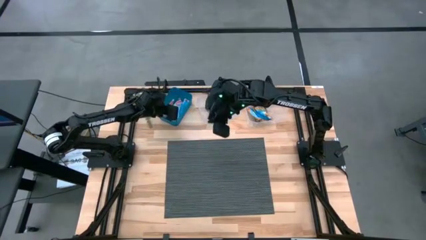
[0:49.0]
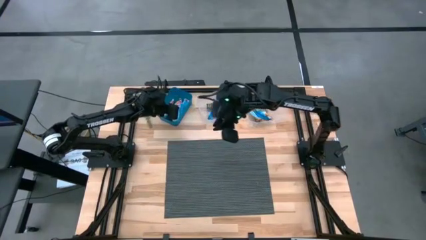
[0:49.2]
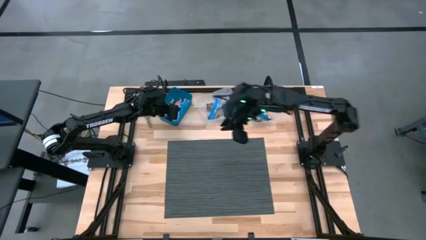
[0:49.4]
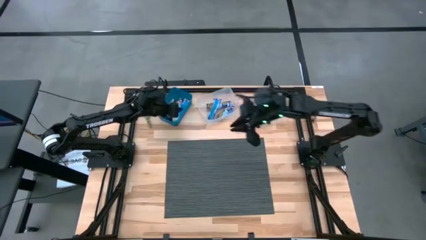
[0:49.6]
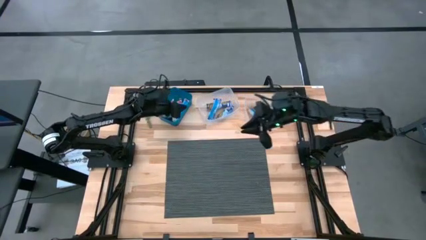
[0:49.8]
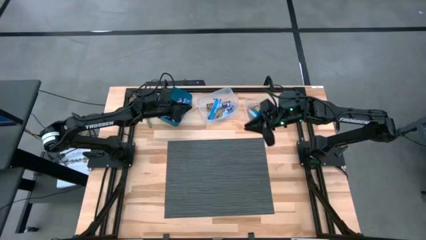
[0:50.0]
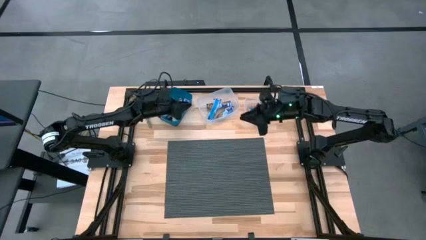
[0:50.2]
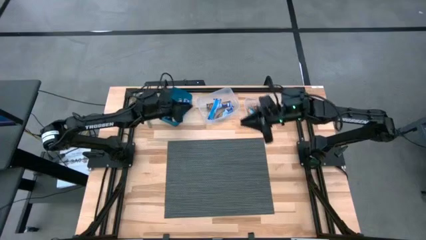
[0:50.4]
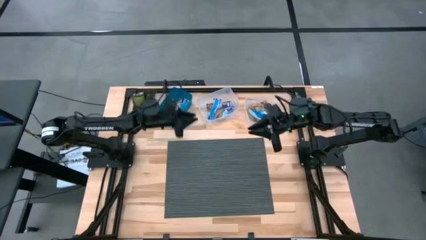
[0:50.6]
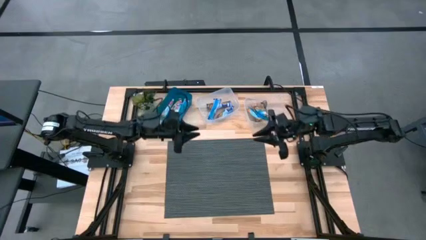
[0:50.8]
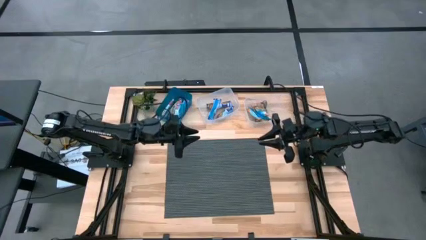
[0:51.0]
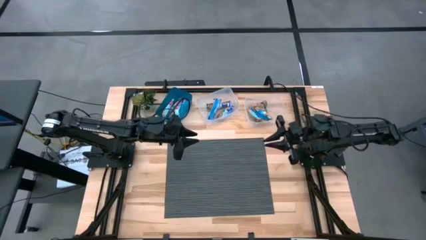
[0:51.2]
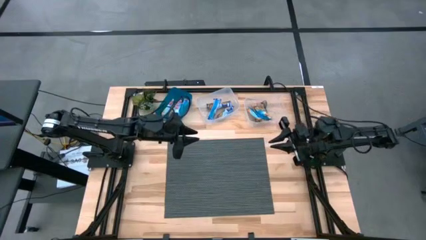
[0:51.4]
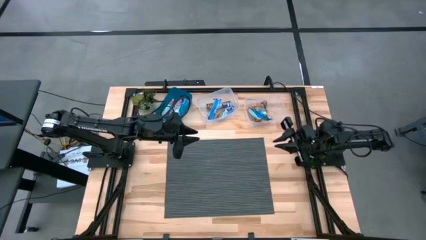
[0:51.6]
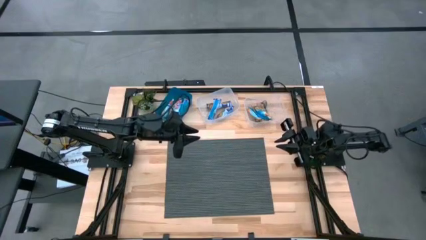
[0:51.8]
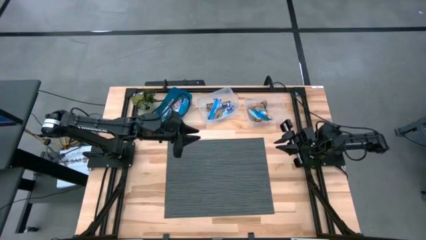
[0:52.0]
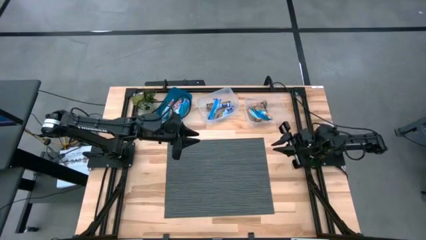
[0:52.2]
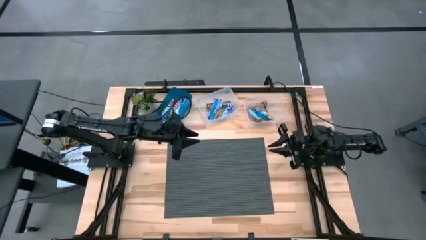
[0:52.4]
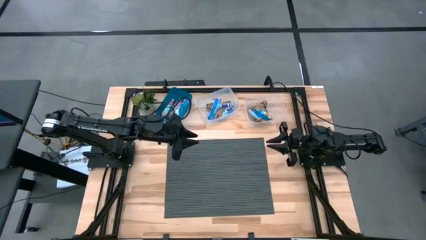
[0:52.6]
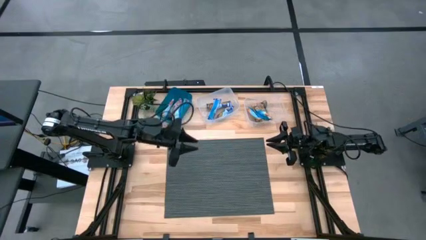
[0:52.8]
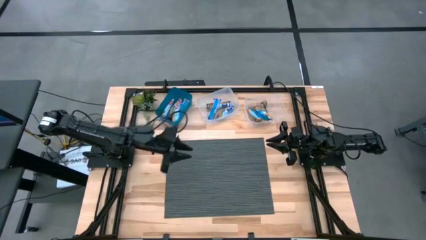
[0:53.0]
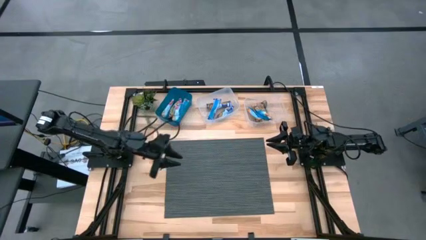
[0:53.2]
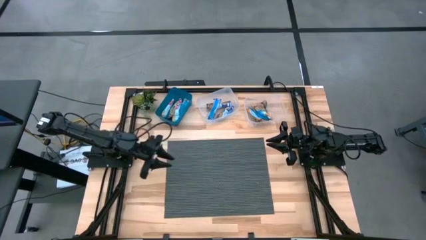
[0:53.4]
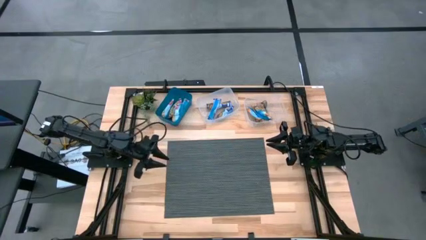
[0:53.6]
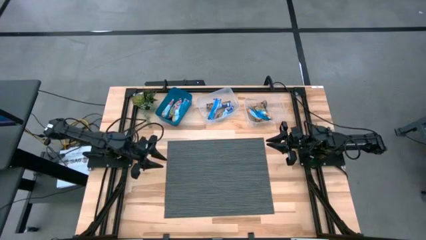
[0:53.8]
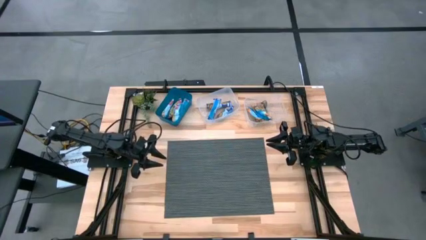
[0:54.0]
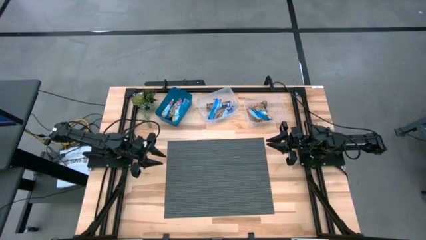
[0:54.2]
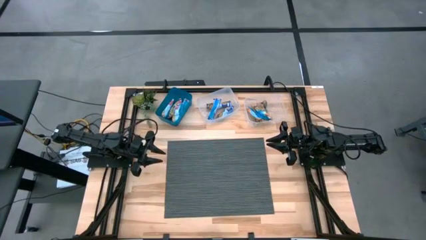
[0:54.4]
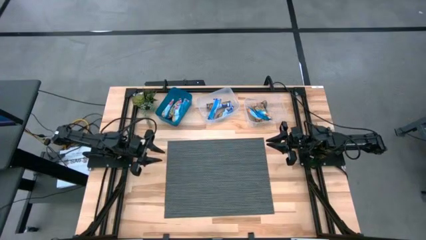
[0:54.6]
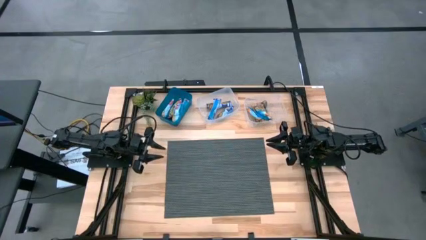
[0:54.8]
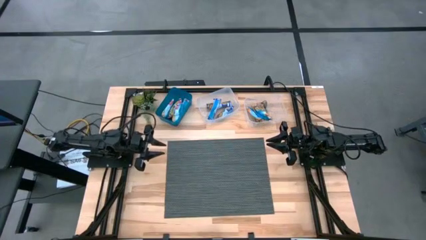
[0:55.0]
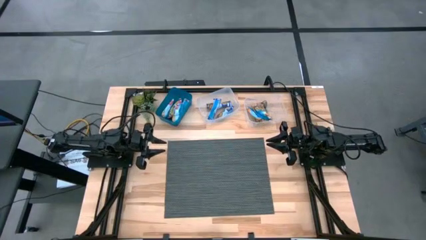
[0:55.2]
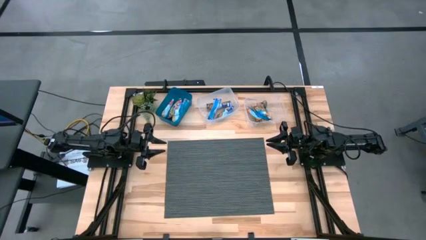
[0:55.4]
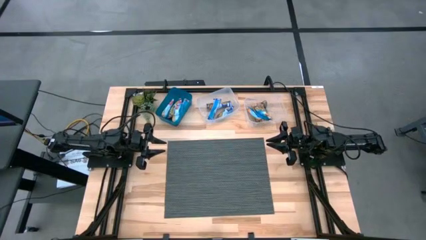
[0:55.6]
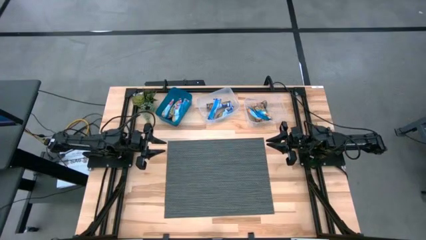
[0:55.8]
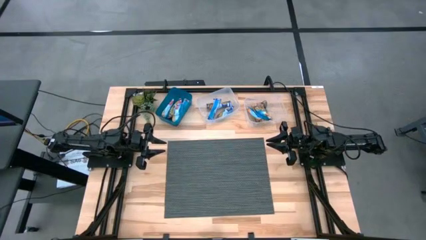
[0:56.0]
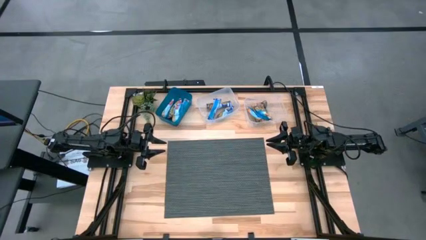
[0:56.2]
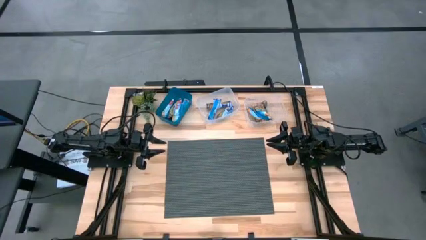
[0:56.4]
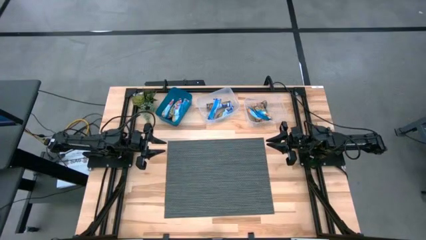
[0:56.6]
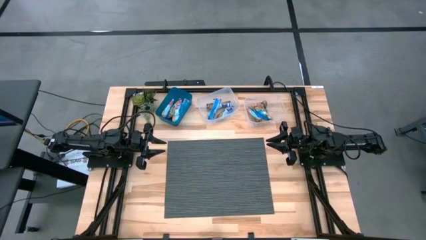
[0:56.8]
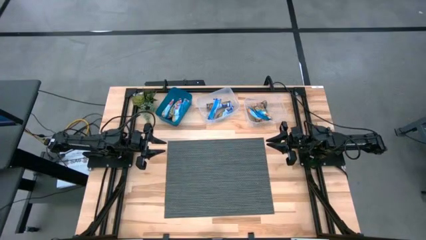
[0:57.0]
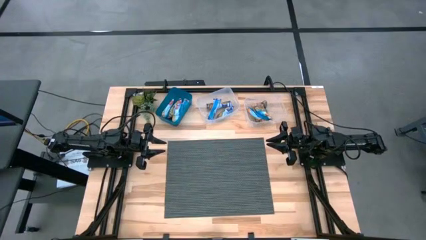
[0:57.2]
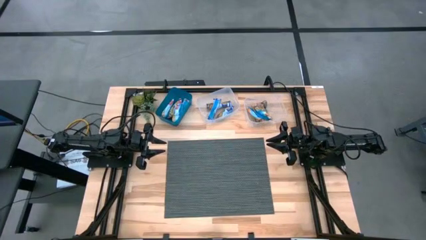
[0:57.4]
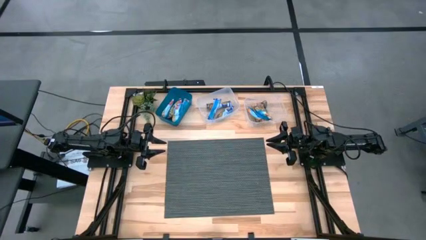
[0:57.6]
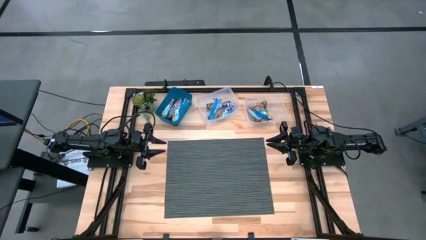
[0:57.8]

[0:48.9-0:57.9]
Task: Pick and place Granola Bars by type
Return to Home Position

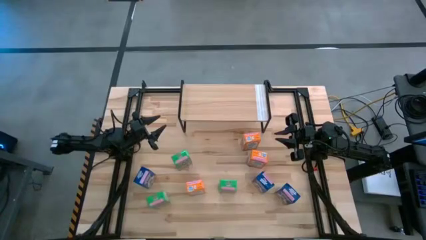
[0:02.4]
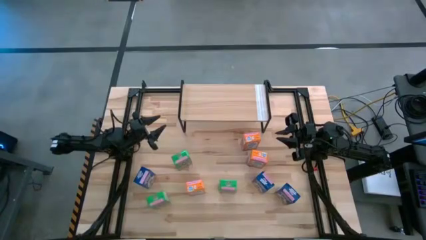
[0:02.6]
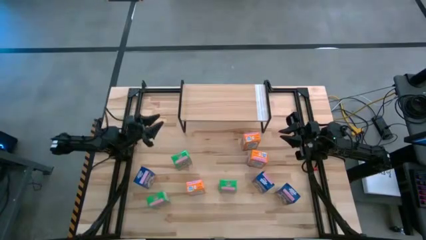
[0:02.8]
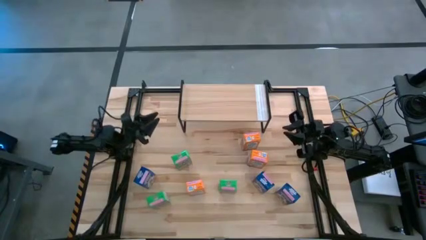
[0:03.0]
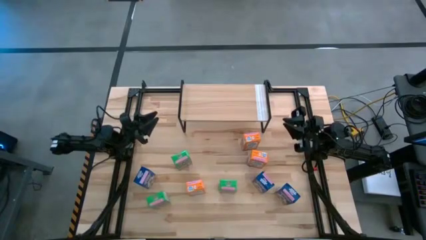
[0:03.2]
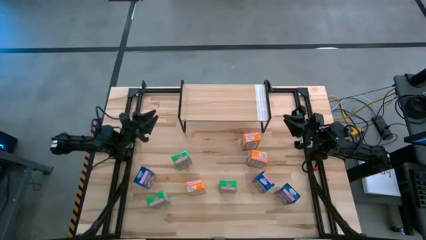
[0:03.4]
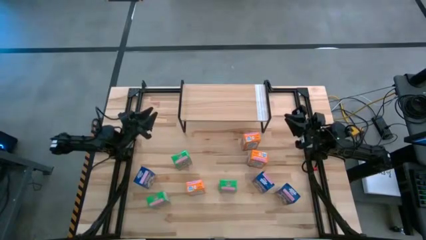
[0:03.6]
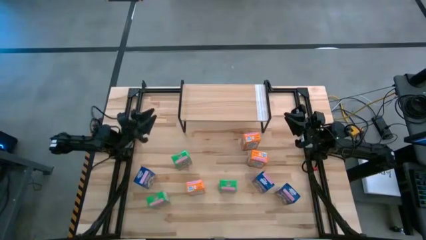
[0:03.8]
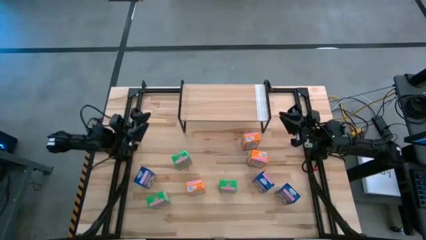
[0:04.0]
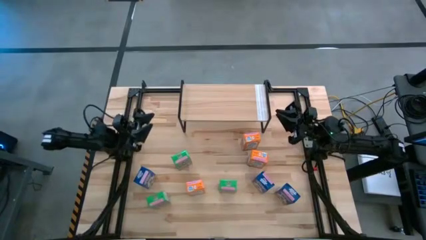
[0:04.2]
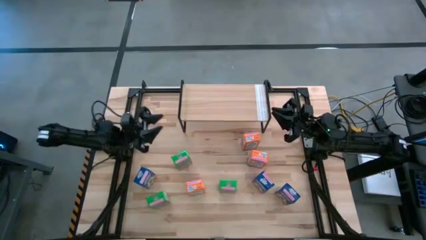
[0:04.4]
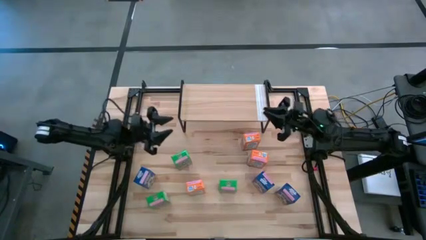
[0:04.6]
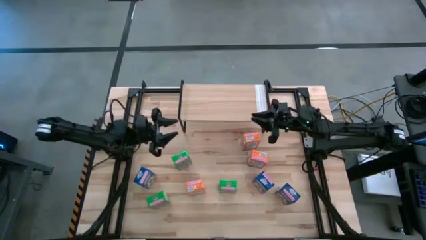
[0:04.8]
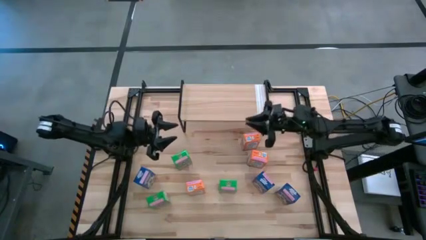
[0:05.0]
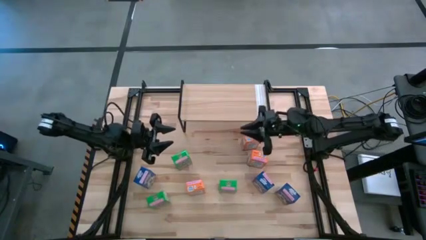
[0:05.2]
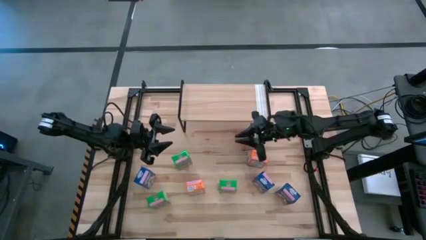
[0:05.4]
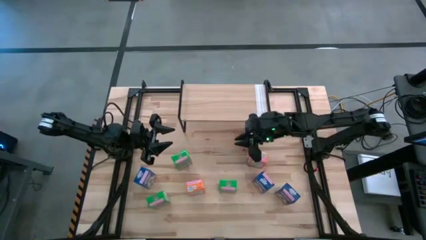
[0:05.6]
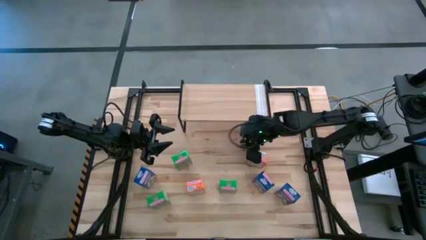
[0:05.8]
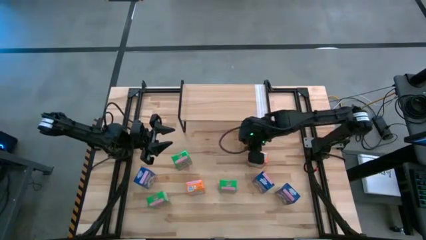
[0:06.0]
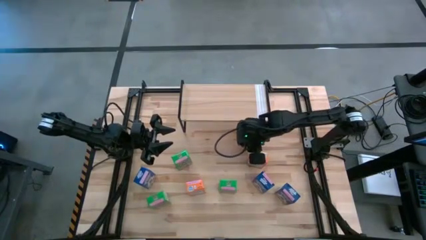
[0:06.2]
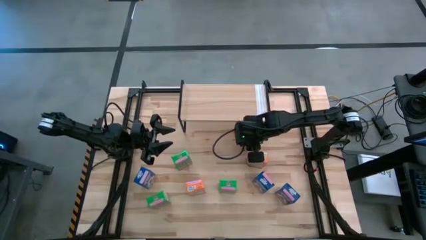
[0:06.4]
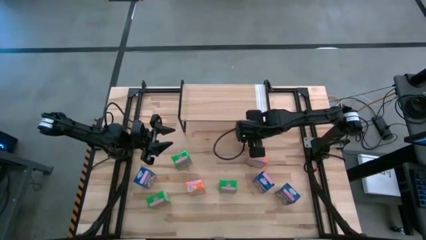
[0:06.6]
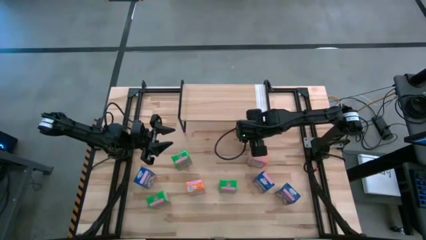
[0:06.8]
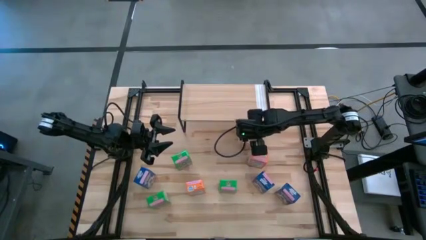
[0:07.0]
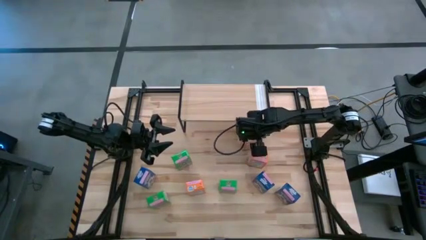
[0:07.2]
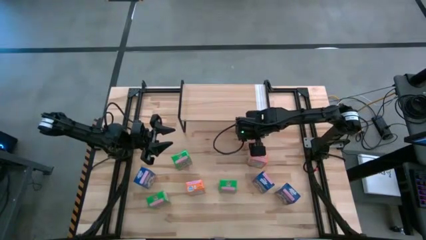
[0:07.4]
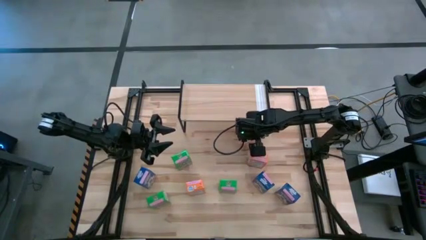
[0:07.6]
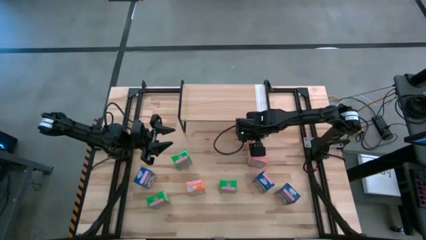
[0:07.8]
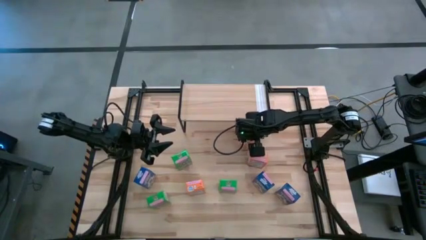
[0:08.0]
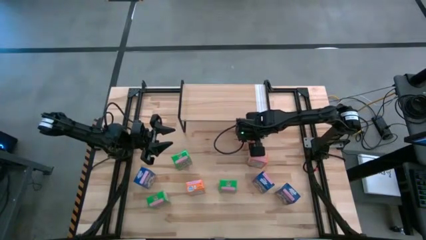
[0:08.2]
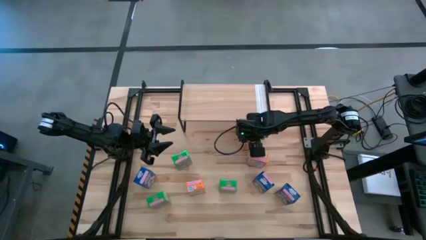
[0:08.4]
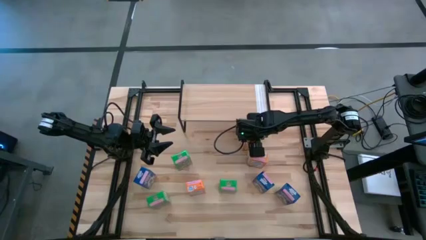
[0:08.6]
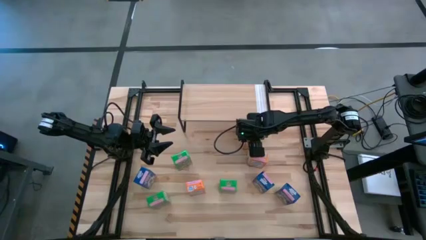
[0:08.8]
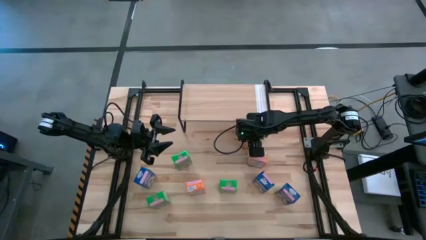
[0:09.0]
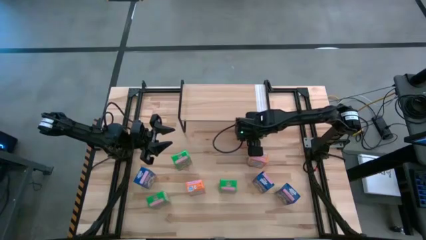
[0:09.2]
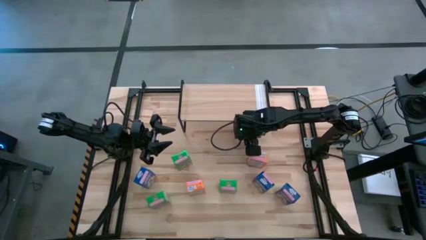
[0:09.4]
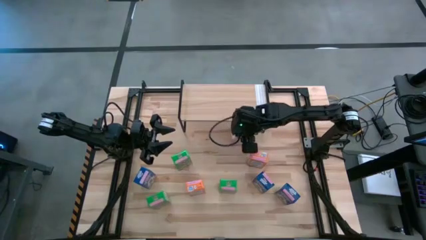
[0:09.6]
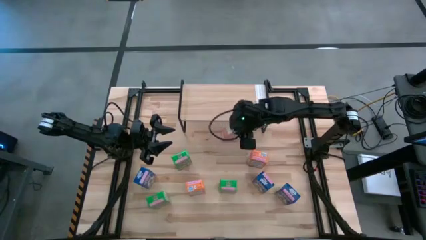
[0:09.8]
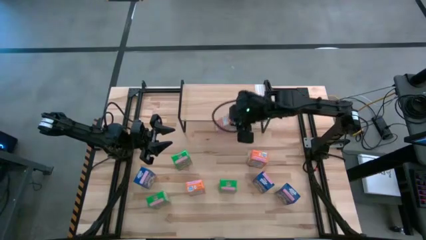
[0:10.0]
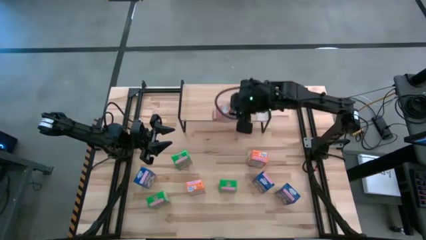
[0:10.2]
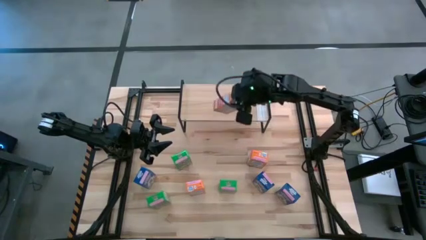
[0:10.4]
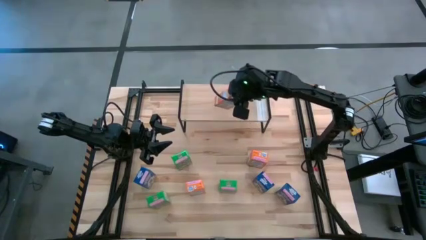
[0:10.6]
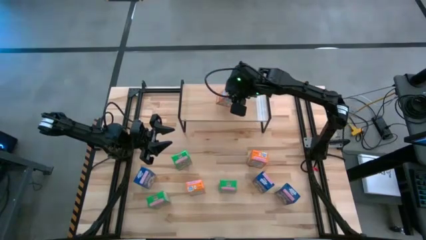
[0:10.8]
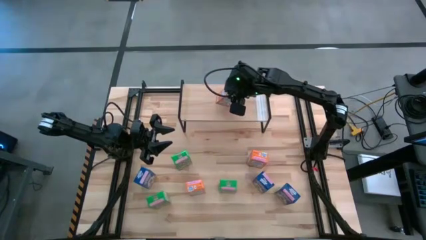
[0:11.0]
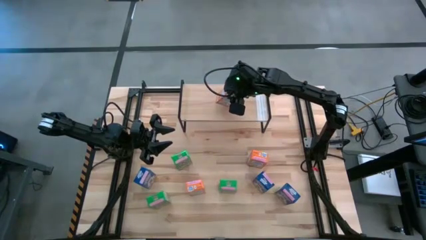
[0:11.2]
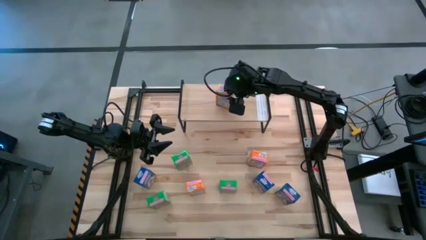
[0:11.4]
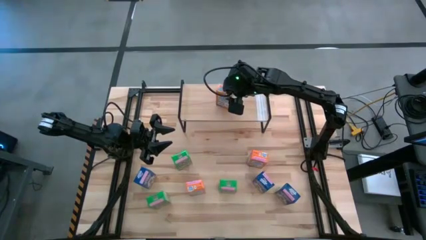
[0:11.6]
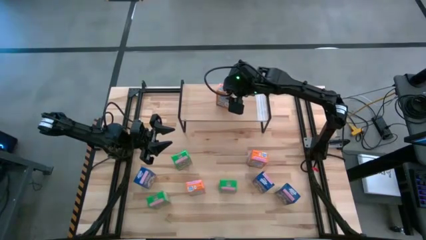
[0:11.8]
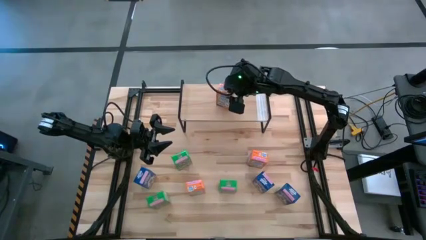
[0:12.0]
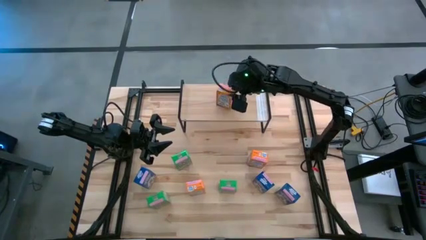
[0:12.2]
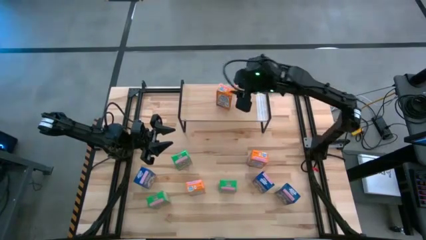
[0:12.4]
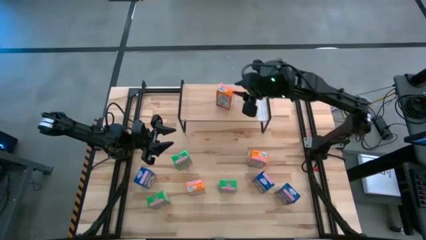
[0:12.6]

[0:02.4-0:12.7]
Task: Stack cereal on shelf
Put the top middle orange cereal box on the shelf
